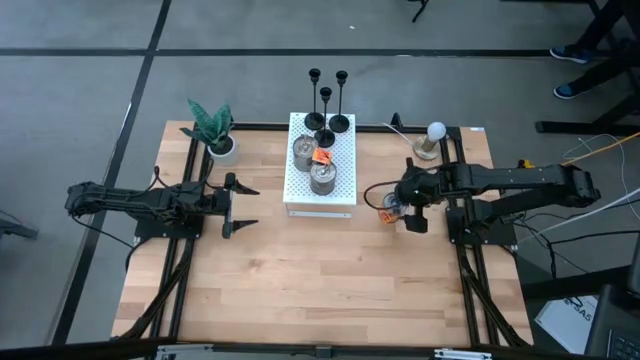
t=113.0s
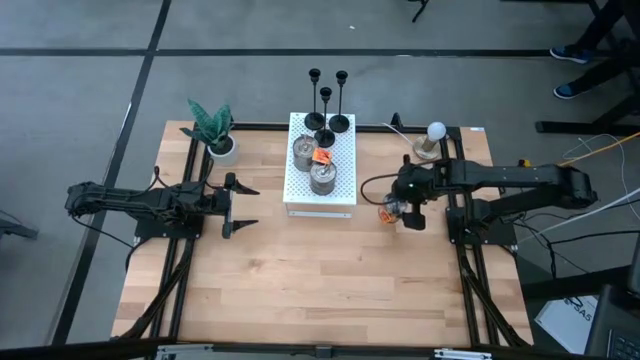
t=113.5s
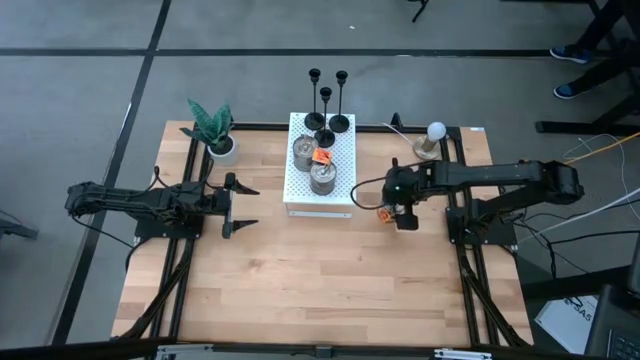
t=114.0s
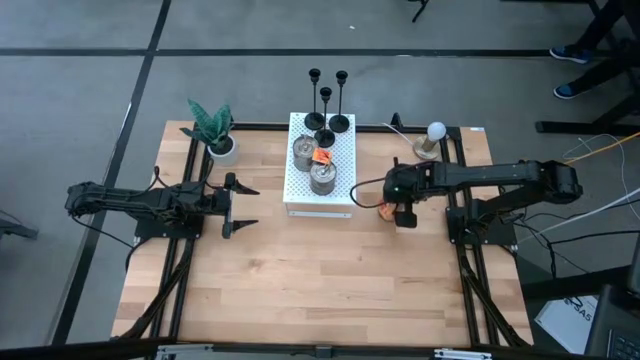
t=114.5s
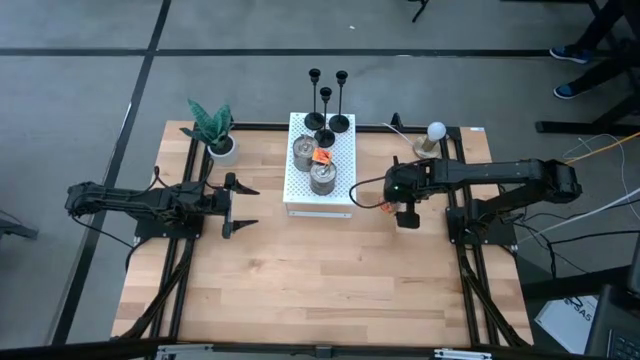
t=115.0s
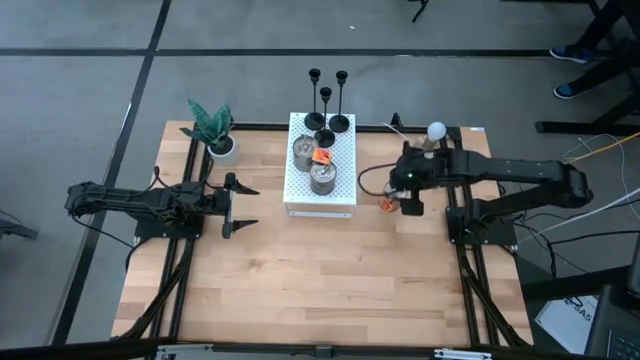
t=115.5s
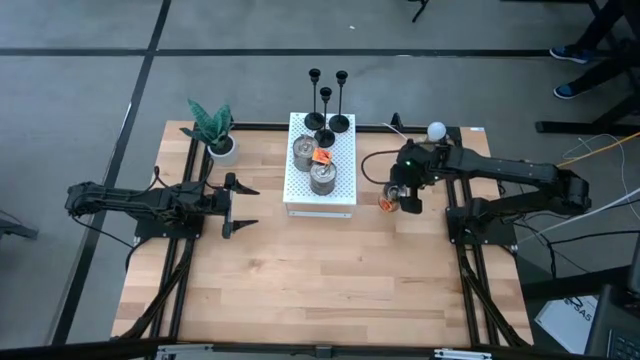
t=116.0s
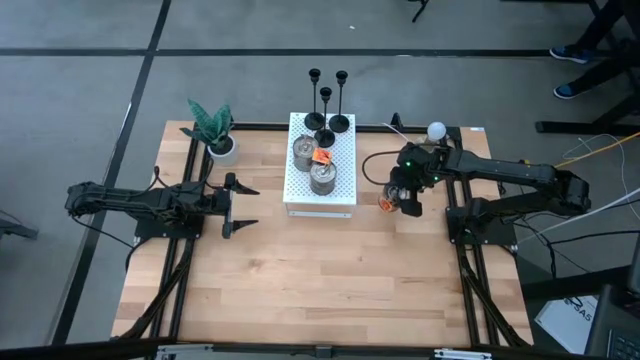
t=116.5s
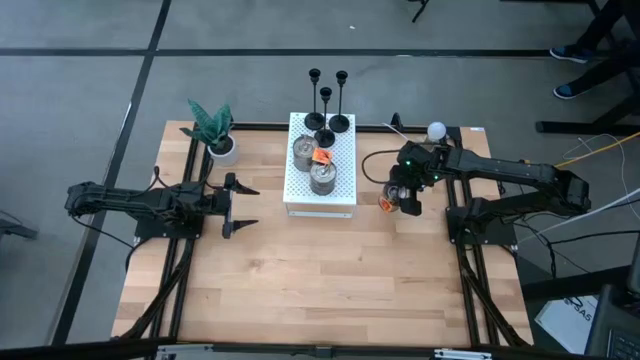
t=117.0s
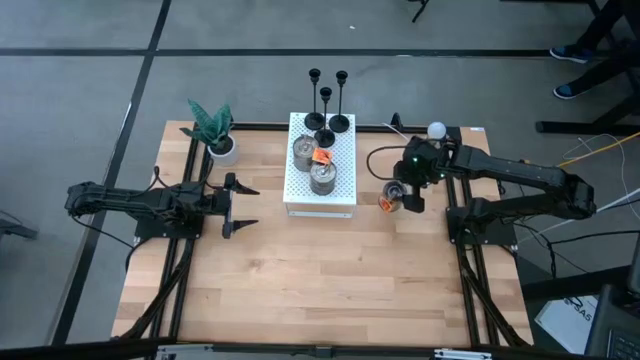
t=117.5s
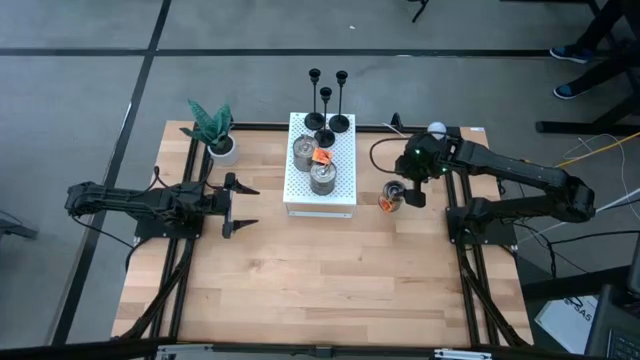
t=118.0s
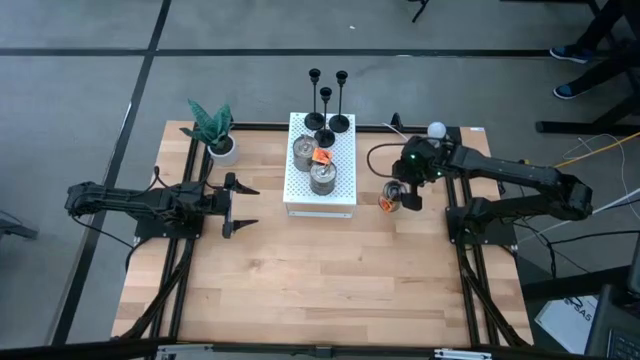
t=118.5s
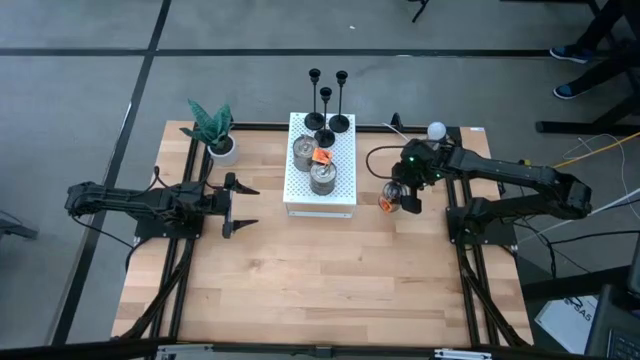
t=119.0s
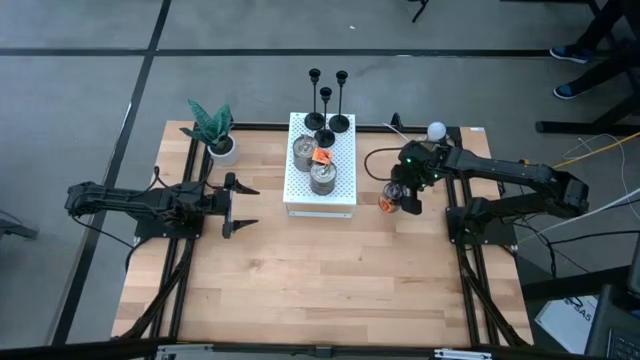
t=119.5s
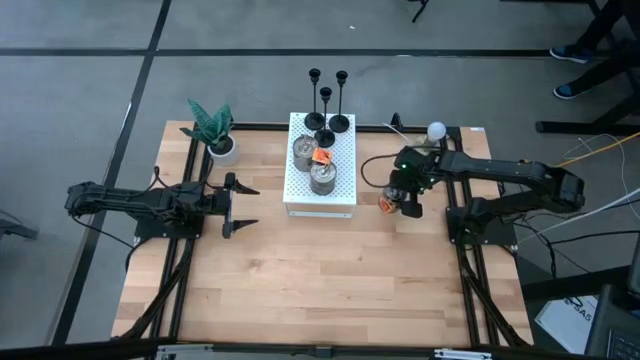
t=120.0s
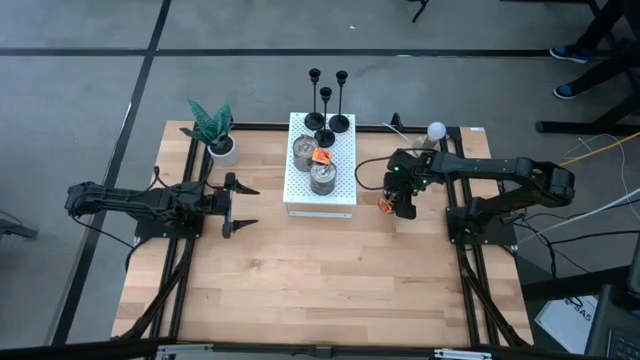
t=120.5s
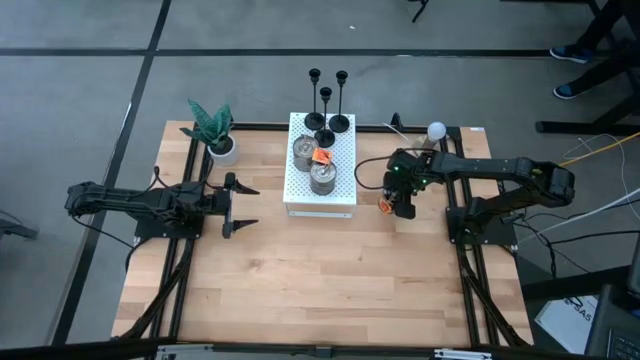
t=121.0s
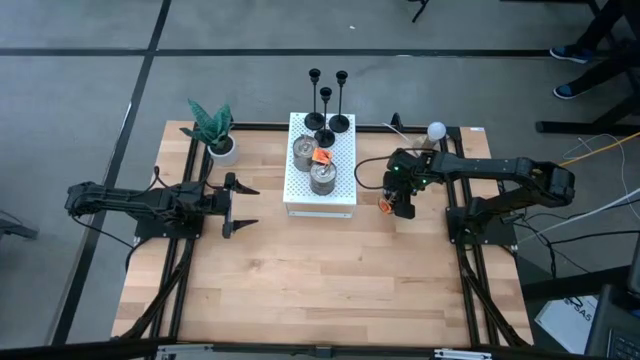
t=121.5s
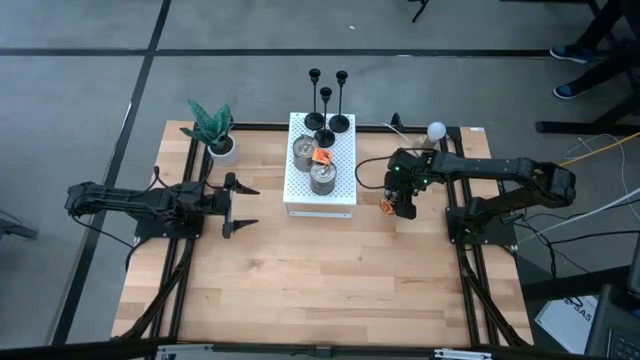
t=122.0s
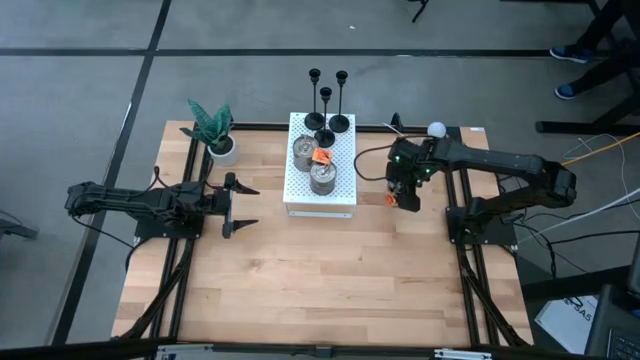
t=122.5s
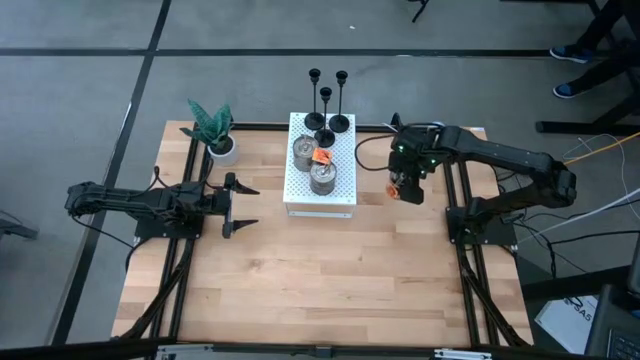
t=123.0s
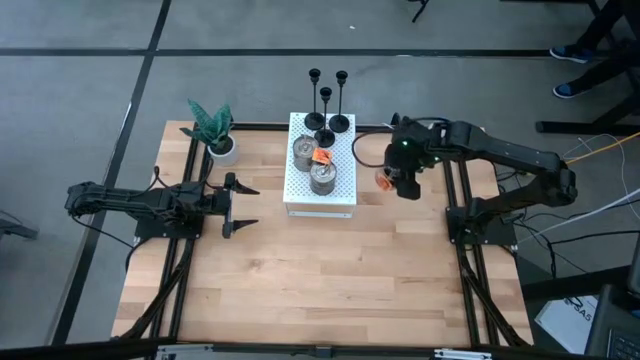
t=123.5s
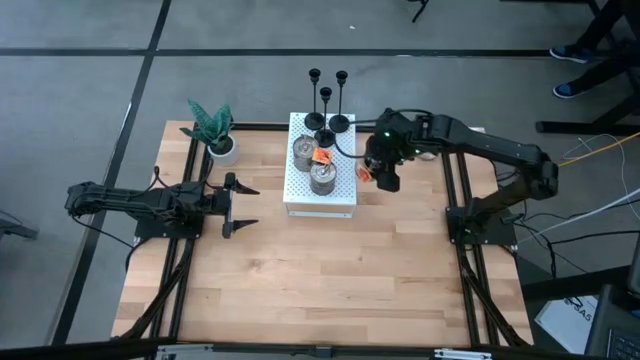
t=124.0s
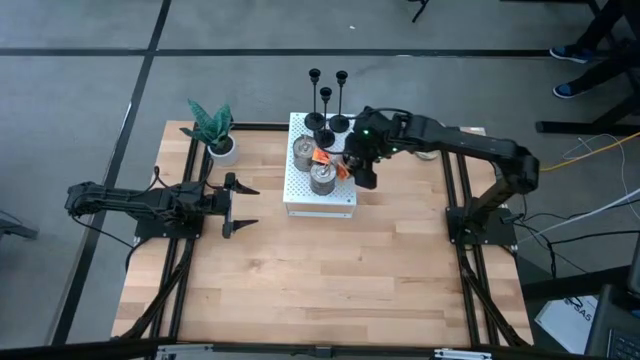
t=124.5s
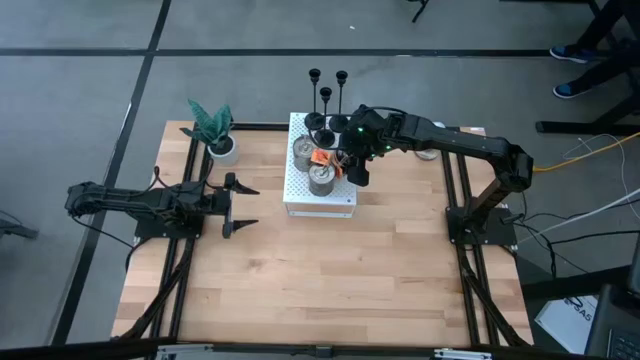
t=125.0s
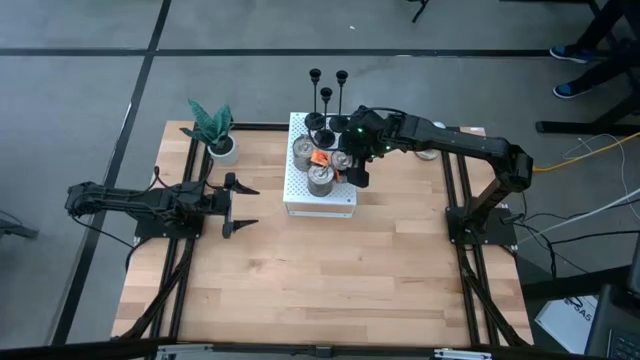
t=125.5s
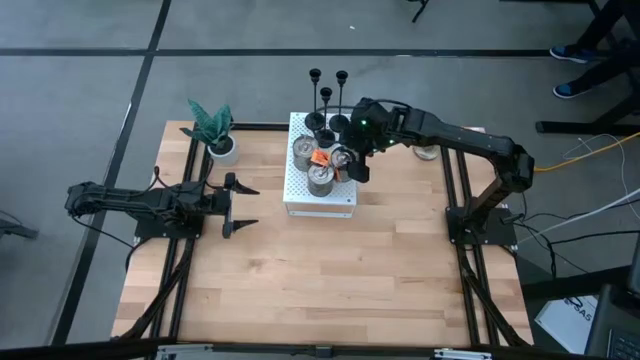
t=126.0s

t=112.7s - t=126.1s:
Task: Pick & Place candle stick holders
Put the orange scented candle on the shelf

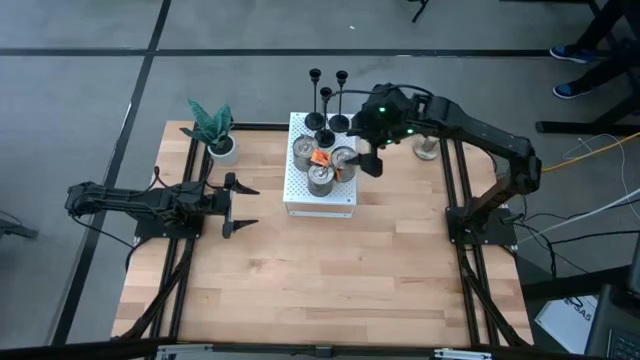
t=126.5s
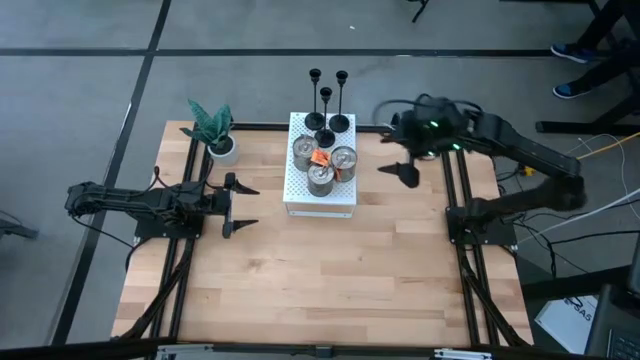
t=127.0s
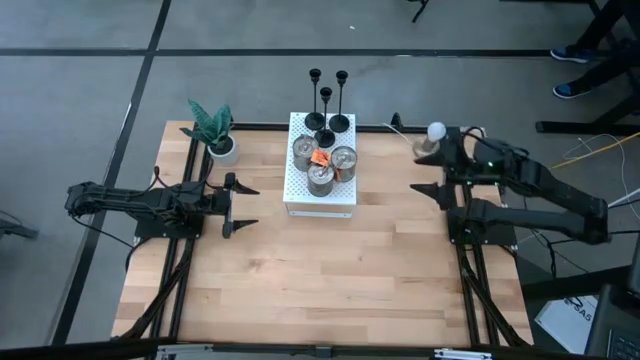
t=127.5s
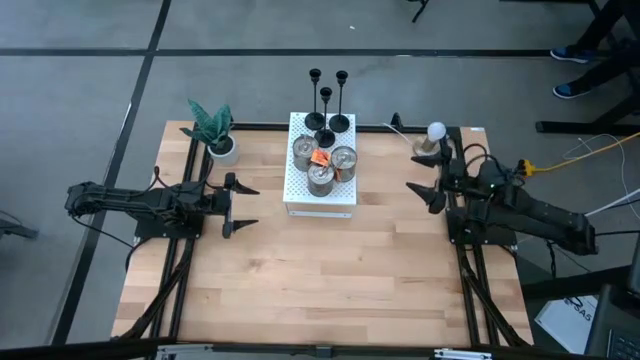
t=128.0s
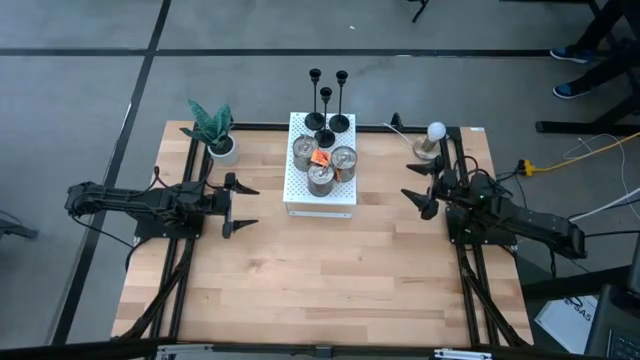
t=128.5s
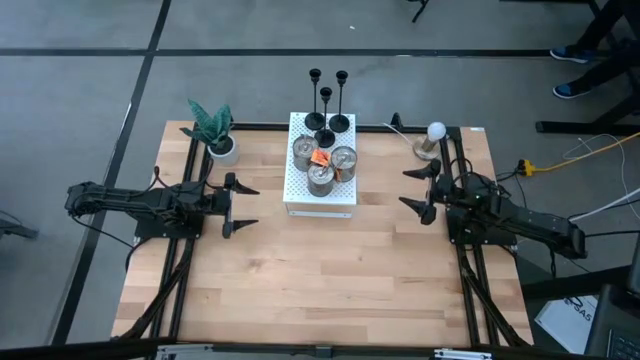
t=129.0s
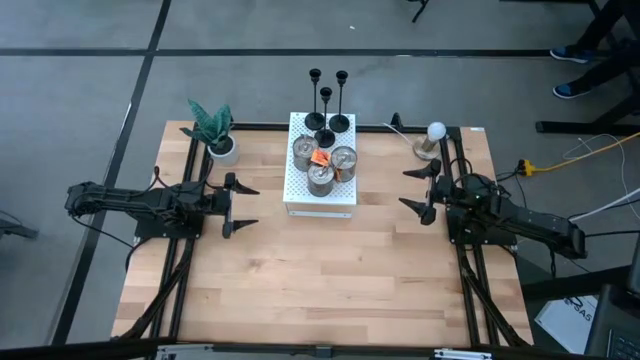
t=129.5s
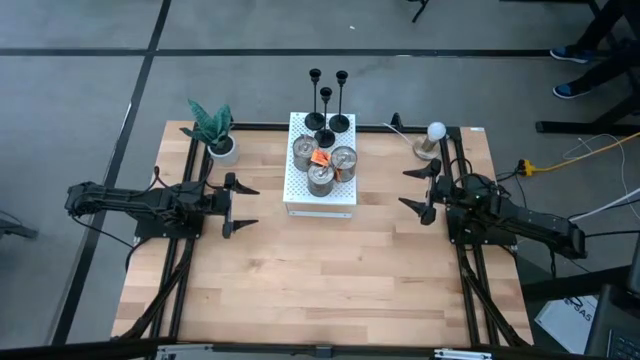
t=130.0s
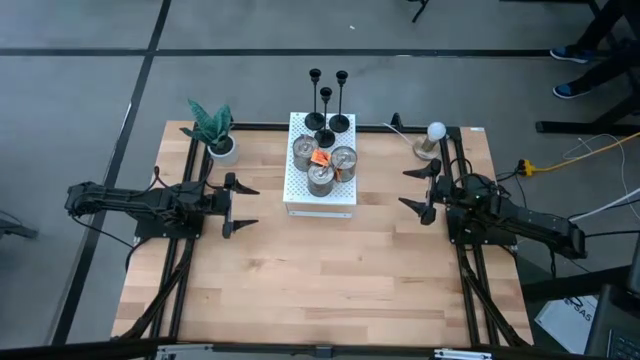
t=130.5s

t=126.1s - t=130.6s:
Return to Home Position

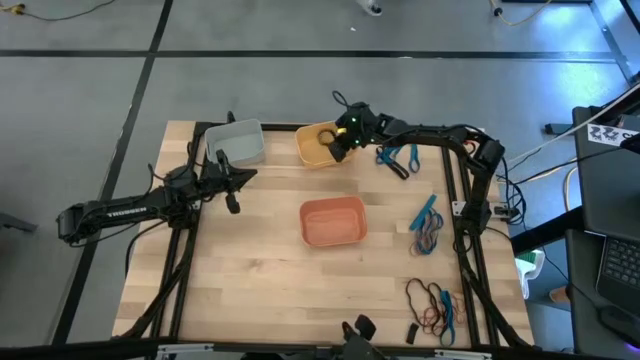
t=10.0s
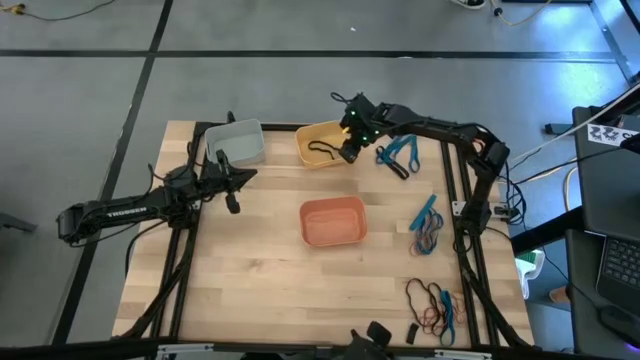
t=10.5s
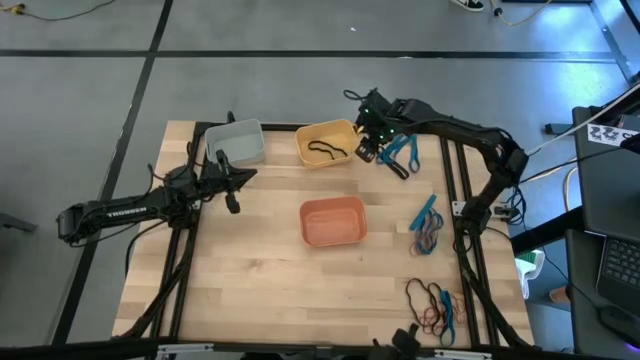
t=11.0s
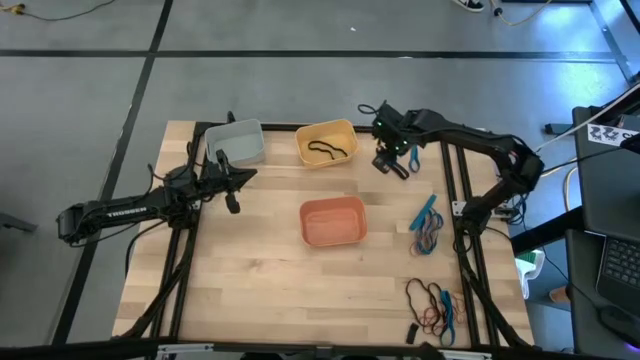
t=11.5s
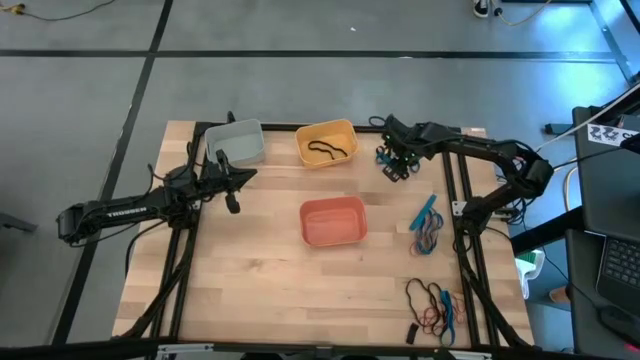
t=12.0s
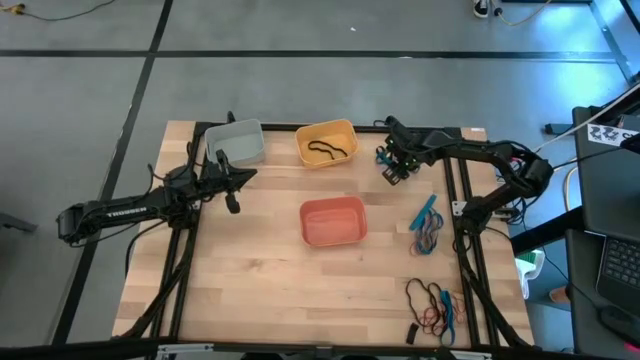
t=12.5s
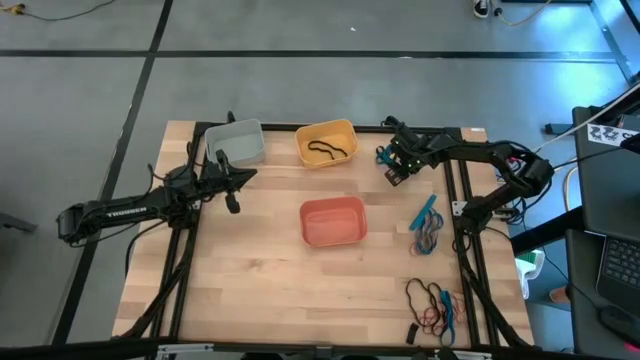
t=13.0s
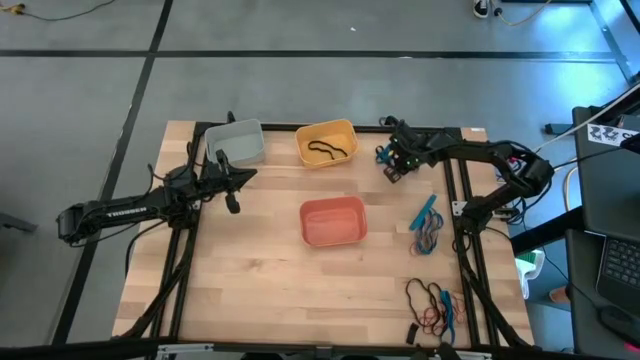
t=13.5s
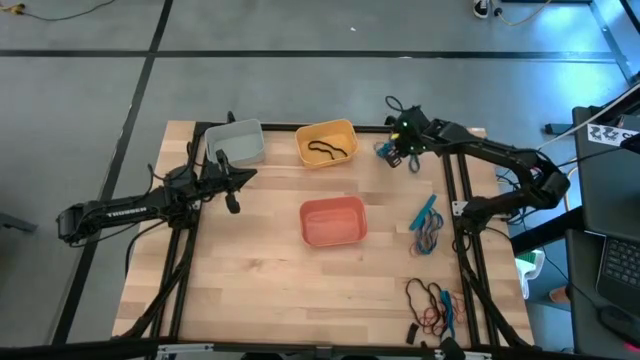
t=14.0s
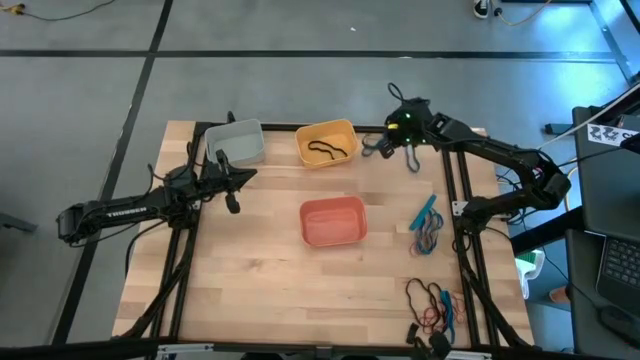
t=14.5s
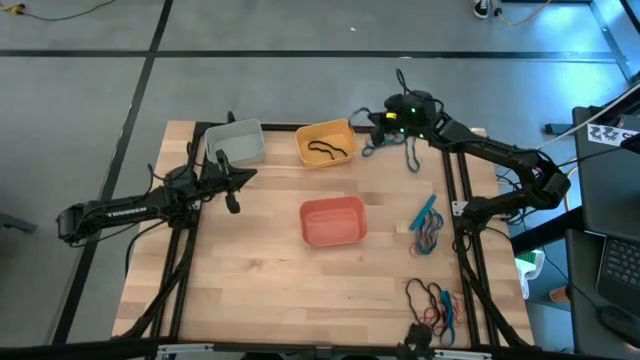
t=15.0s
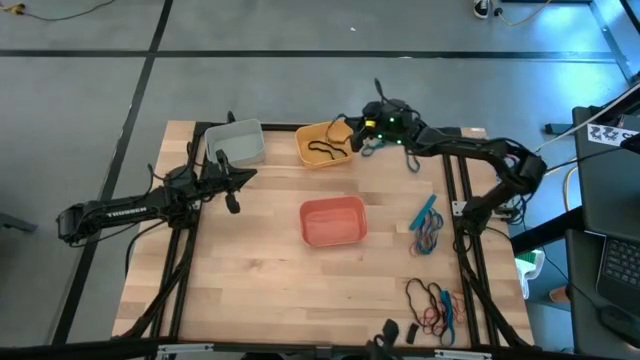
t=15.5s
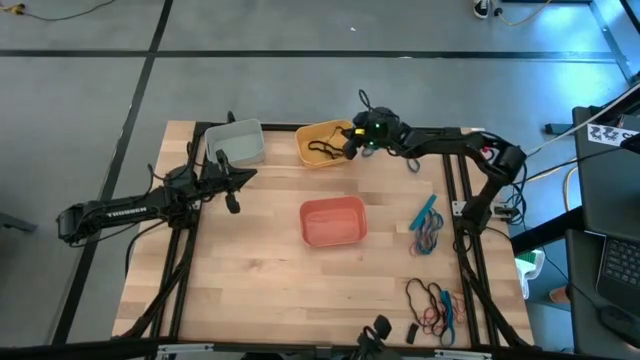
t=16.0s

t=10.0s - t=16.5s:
Task: Sort rubber bands into baskets
Put the black rubber band into the yellow bin
